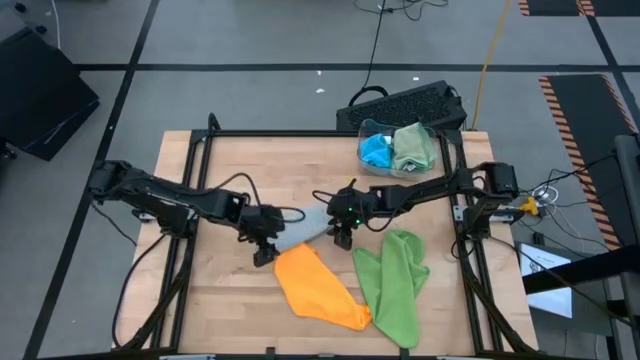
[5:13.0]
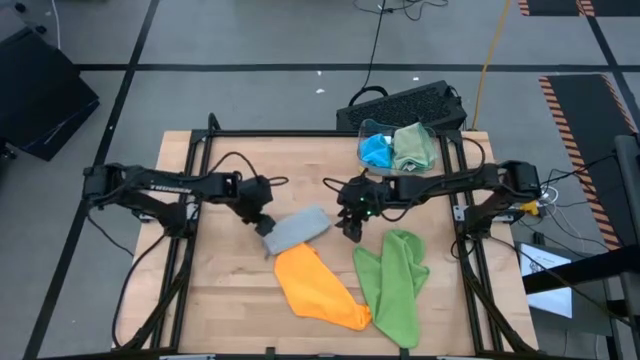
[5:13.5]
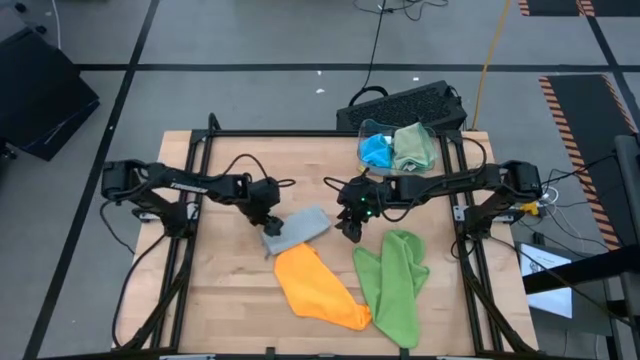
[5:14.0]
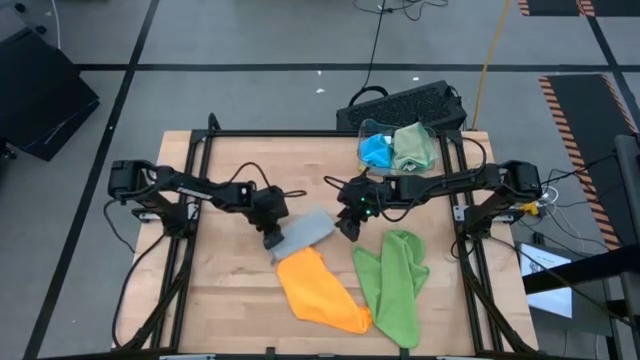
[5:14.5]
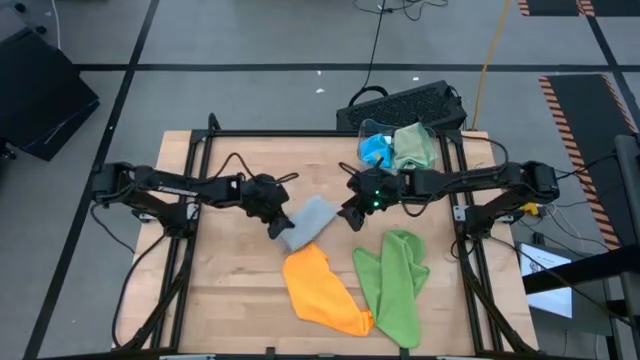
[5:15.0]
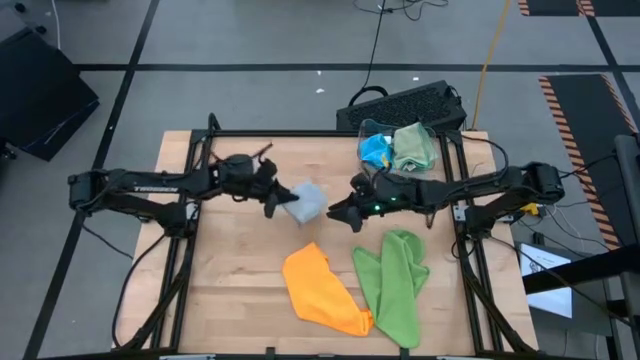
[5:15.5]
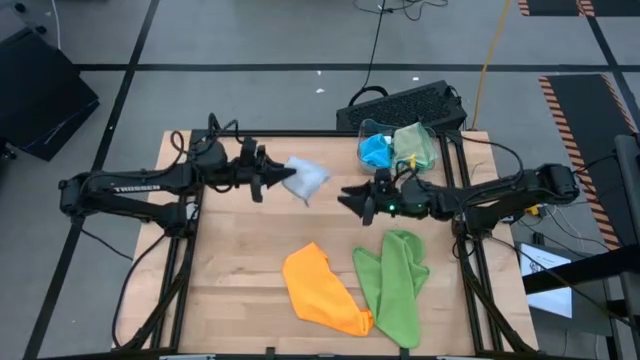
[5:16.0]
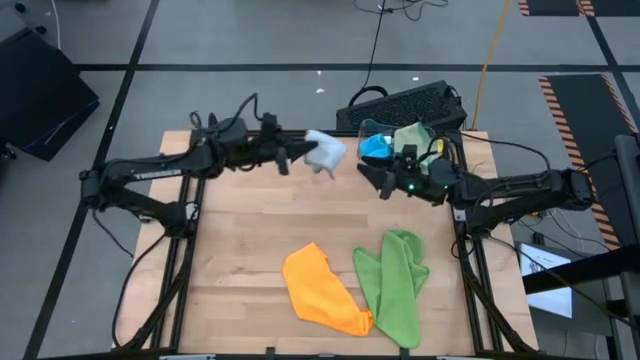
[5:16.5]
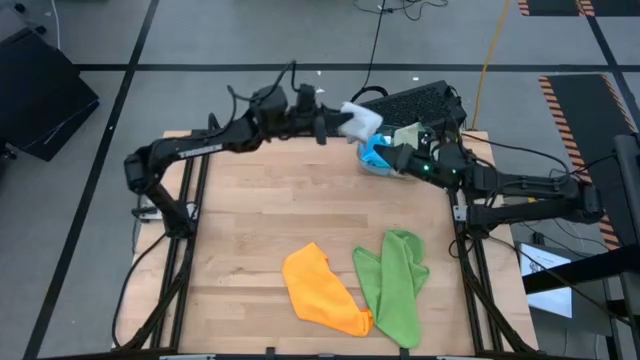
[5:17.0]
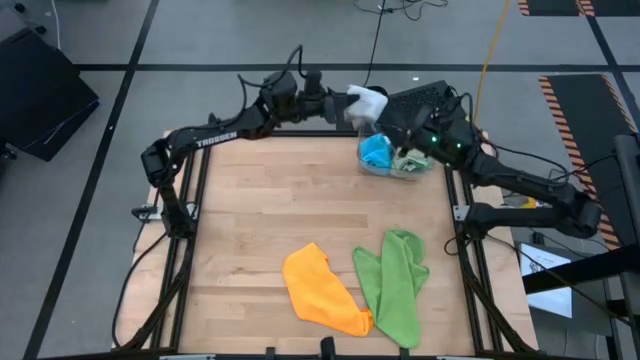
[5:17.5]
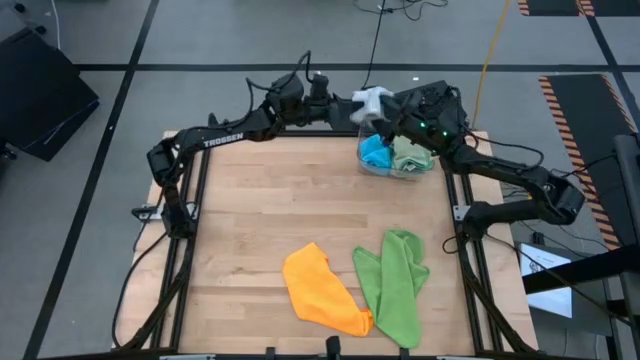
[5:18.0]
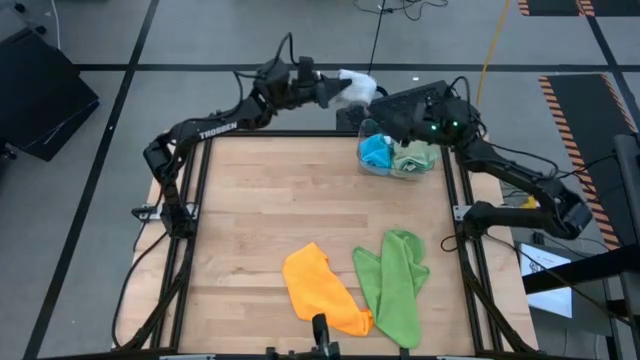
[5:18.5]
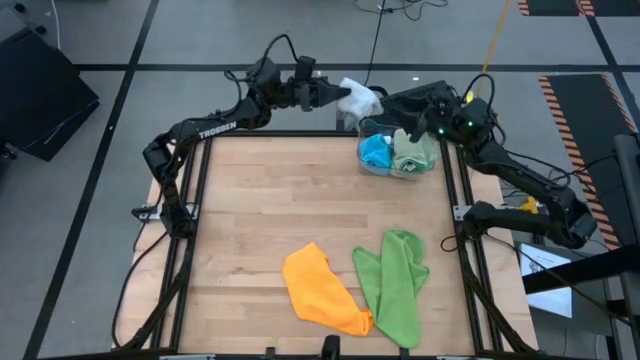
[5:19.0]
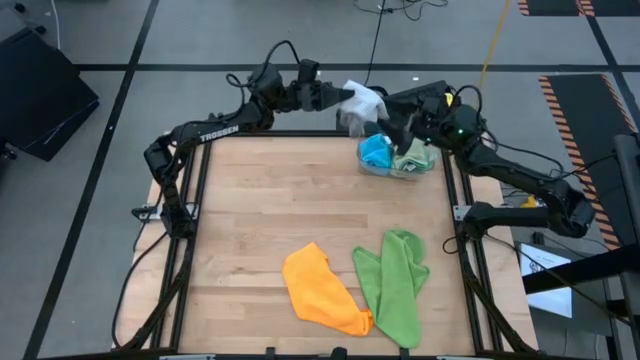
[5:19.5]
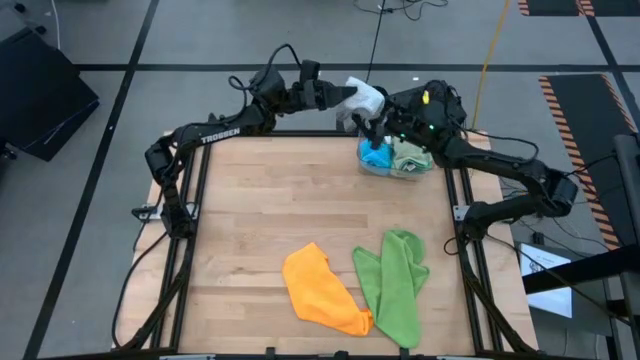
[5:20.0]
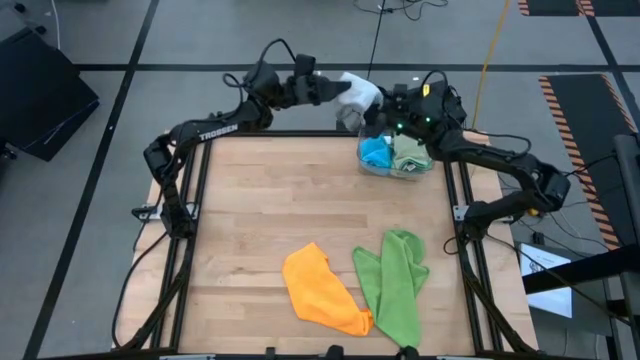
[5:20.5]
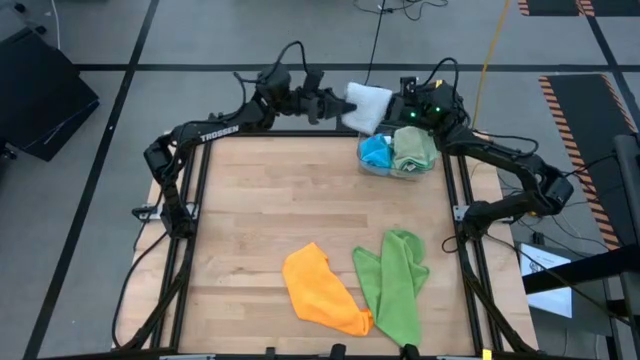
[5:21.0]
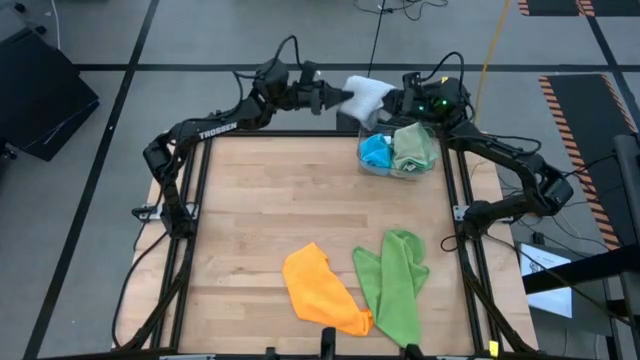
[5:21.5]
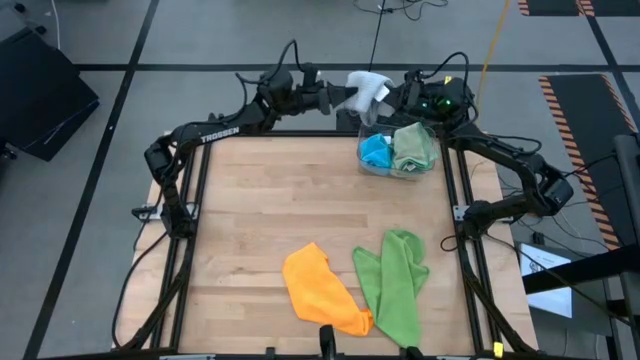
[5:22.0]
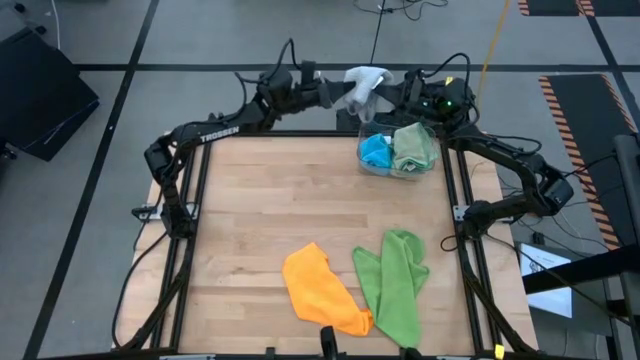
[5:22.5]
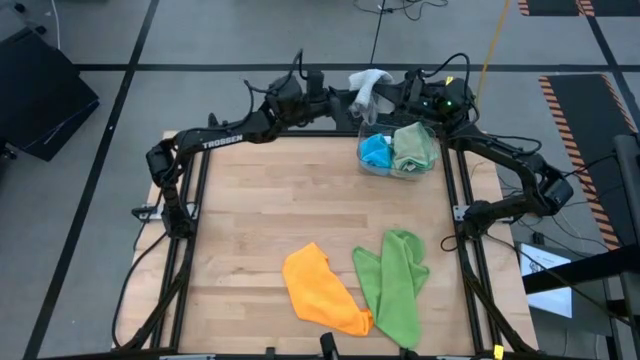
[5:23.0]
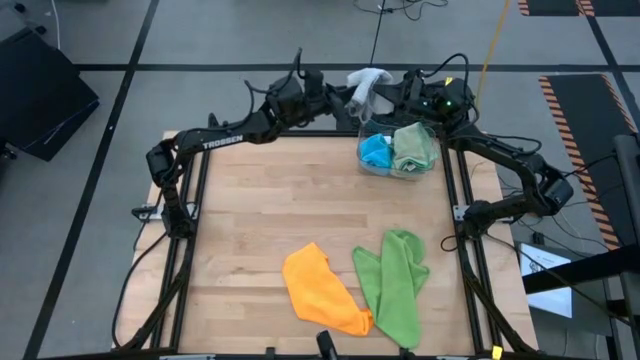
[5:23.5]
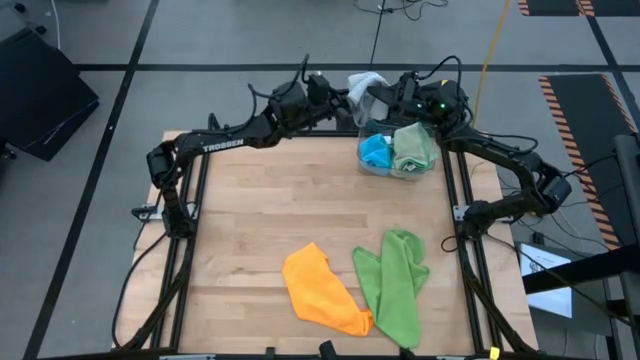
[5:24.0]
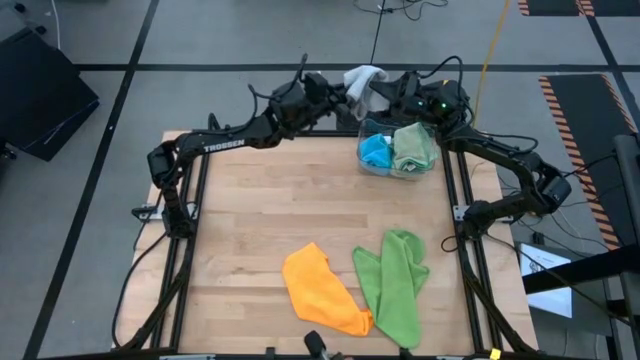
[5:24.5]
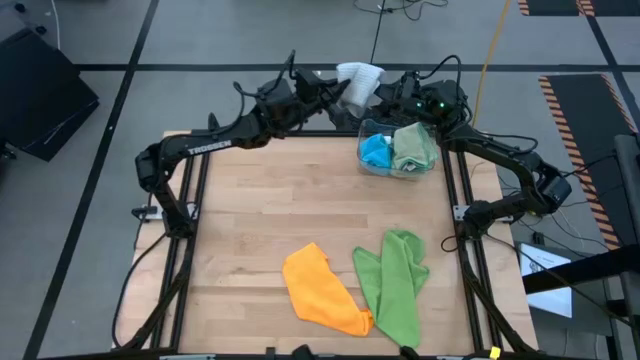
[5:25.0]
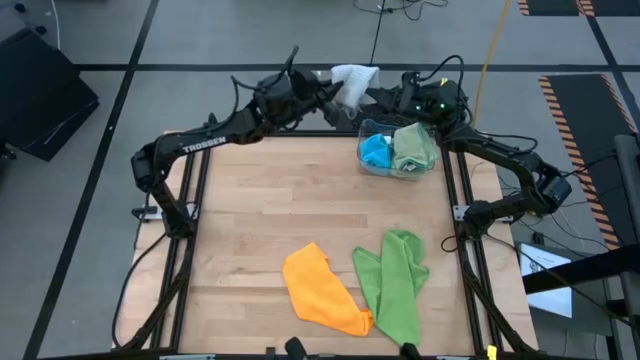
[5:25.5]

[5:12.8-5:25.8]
Task: Fold microfiber towels
Put the grey microfiber towel into the transparent bin
